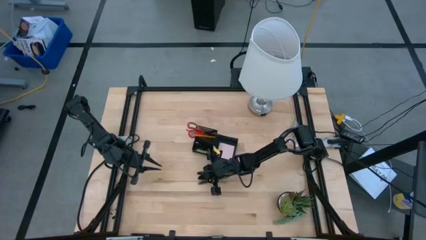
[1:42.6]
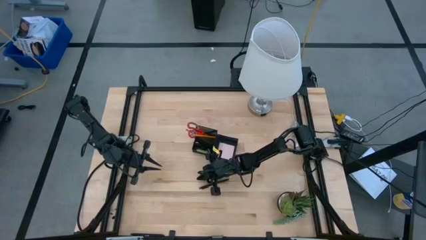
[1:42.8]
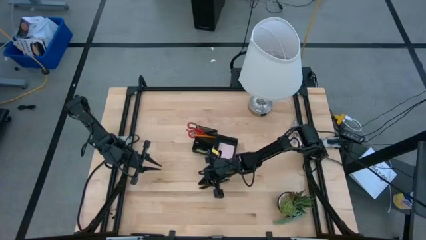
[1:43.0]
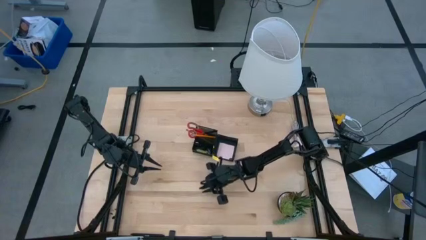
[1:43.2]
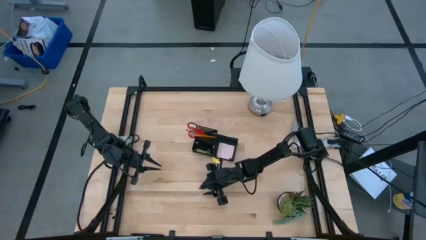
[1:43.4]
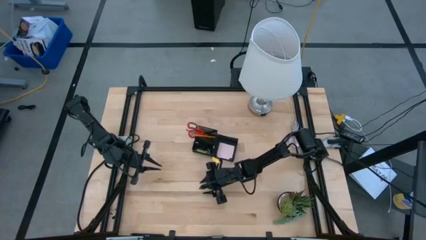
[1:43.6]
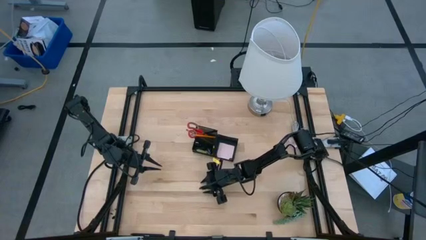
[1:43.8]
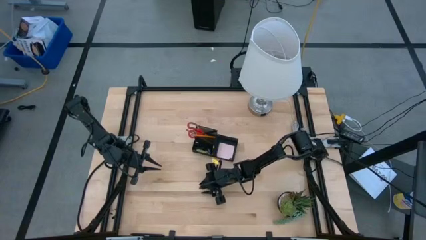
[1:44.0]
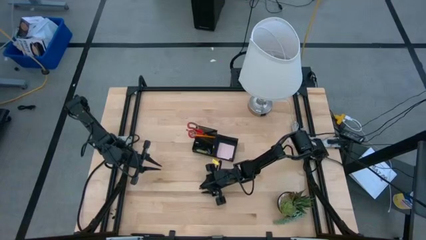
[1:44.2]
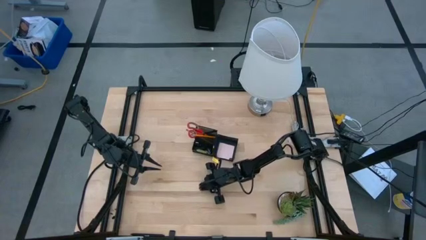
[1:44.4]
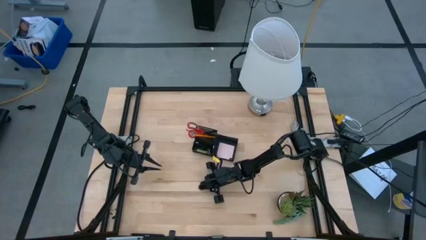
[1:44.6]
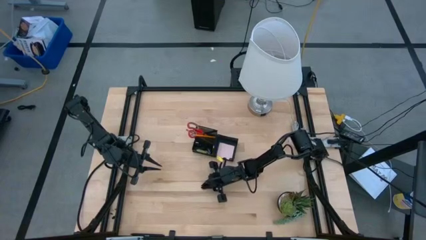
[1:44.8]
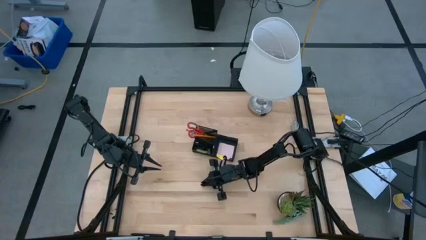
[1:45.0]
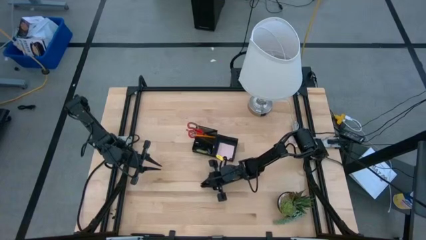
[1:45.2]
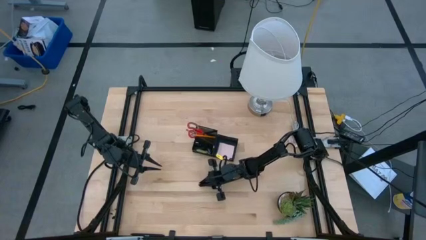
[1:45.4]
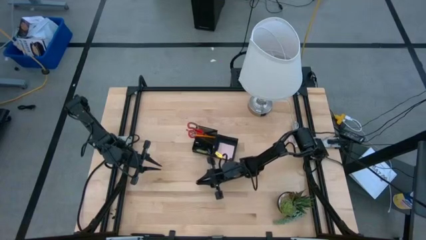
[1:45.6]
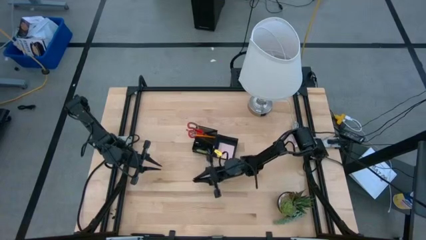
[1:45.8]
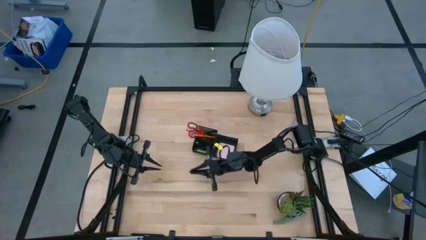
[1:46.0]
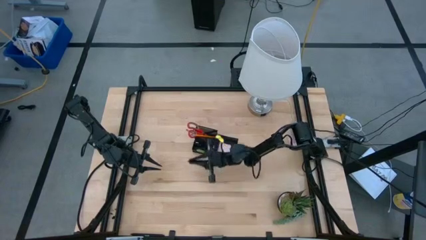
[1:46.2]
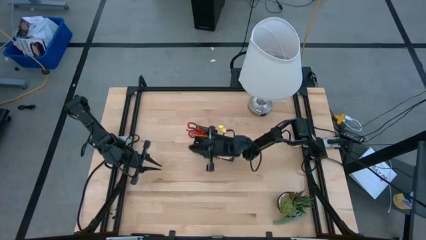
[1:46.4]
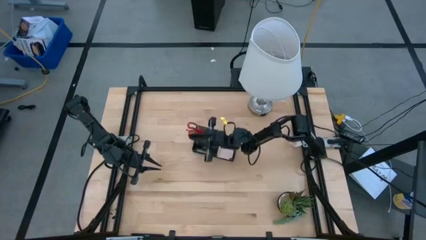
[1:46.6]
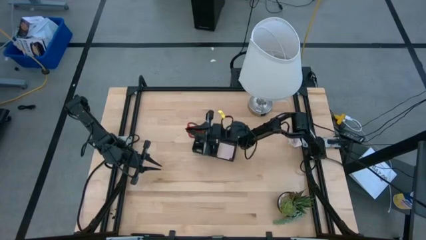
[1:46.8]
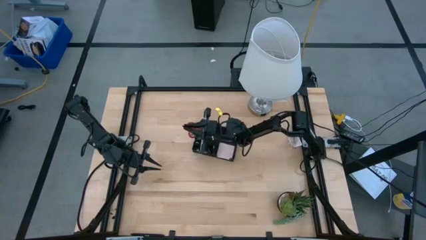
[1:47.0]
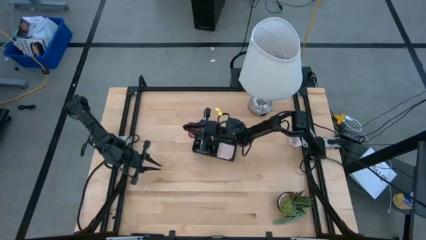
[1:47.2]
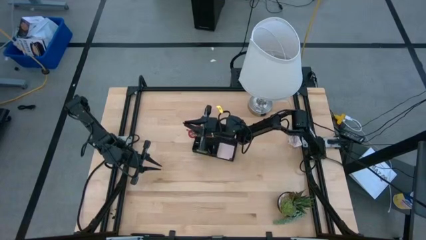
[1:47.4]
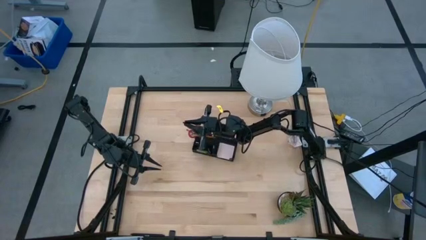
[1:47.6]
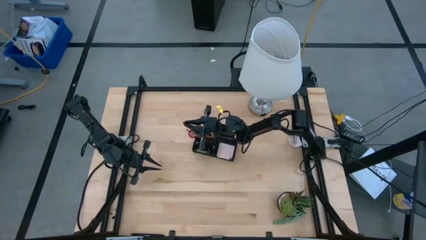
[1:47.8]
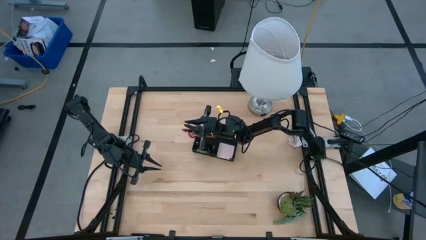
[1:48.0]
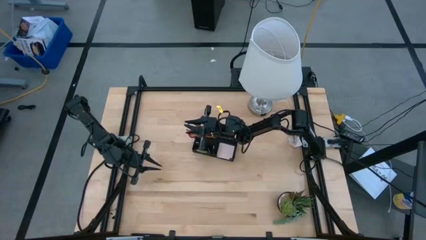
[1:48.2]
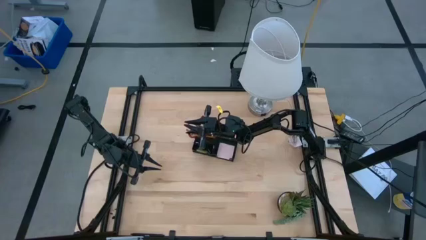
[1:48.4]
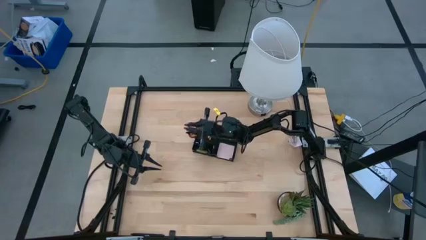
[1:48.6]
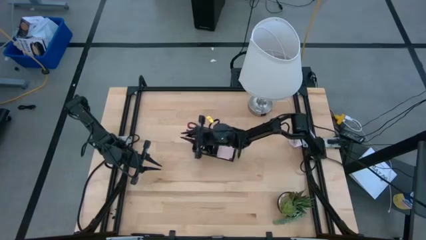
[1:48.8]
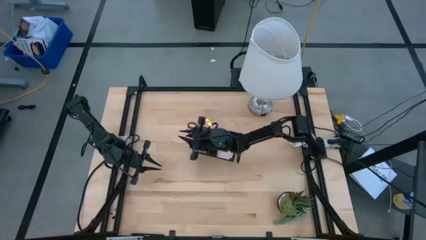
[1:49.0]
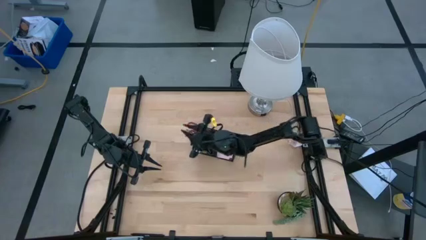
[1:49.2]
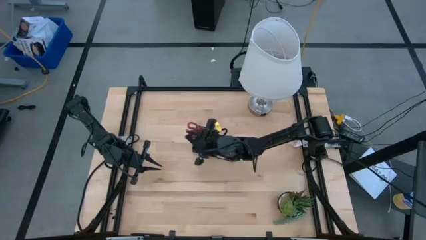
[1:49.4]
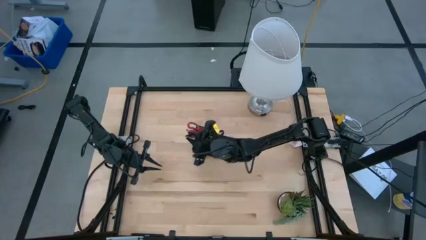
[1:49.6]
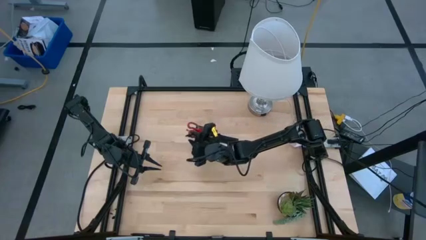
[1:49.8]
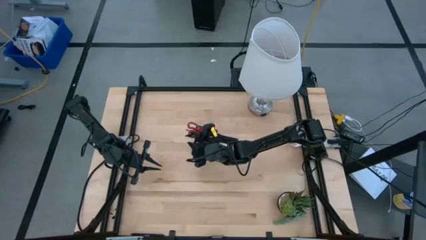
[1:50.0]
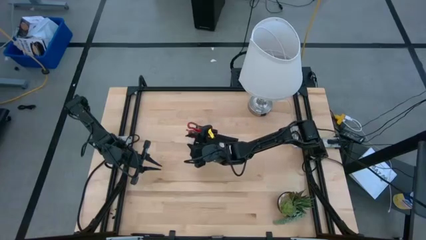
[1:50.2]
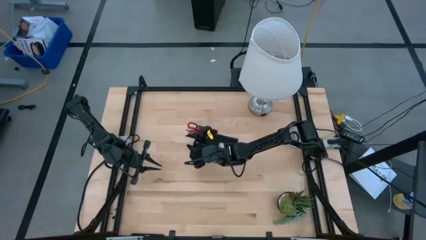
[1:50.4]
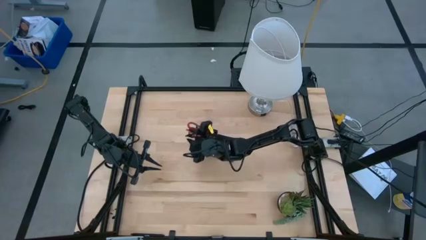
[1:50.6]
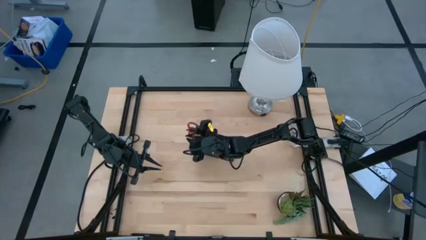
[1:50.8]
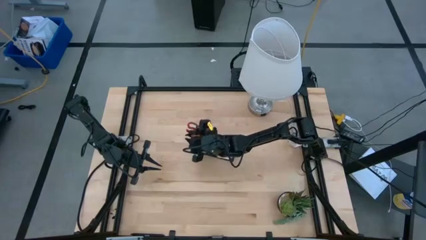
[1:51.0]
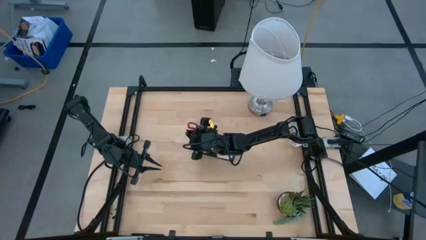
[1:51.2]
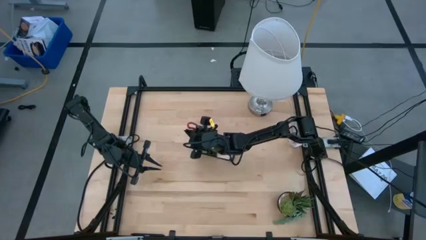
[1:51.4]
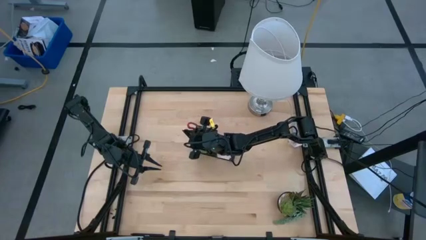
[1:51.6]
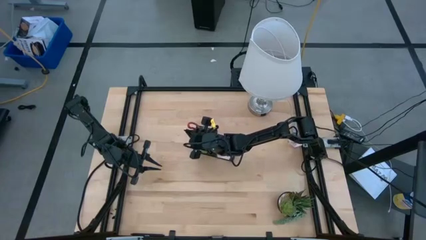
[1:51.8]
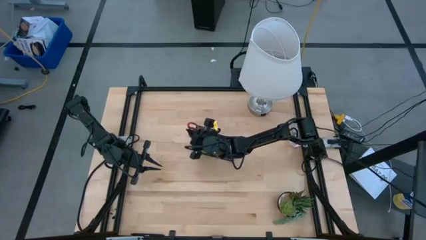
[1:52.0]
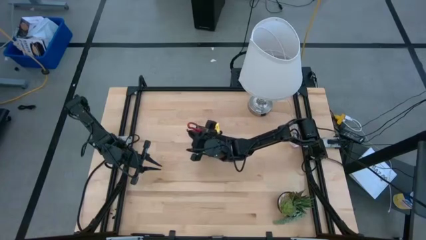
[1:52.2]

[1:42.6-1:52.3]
Task: Pick and place office supplies into organizer
Put the black pen into the black desk organizer
